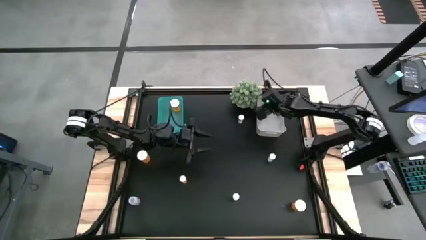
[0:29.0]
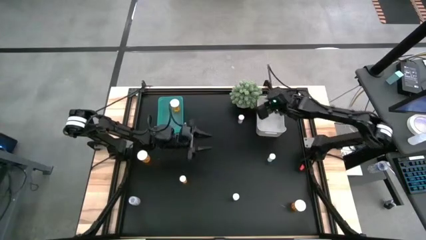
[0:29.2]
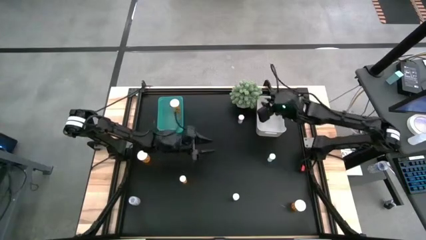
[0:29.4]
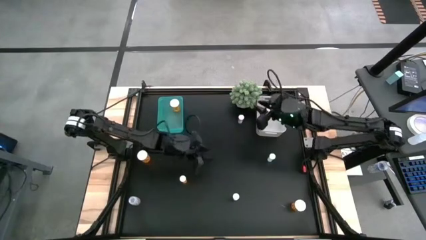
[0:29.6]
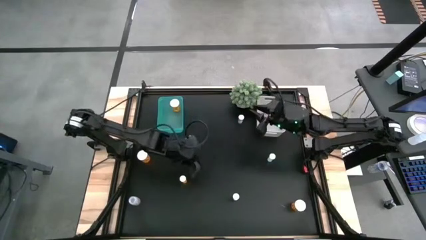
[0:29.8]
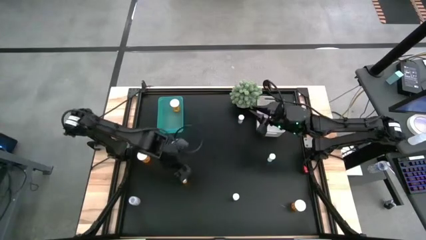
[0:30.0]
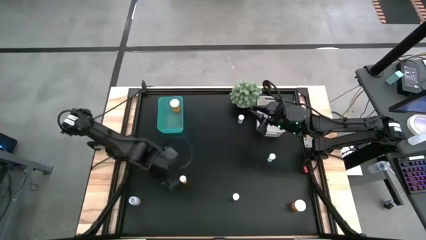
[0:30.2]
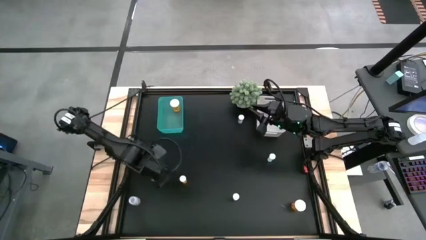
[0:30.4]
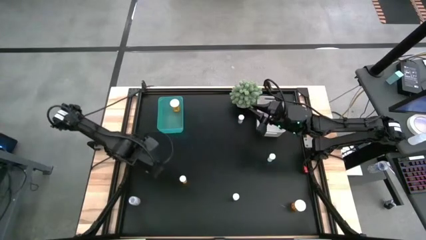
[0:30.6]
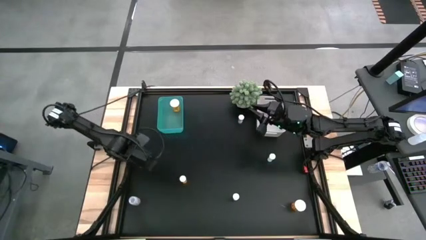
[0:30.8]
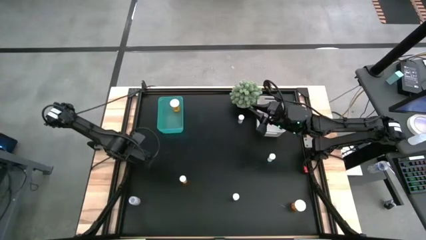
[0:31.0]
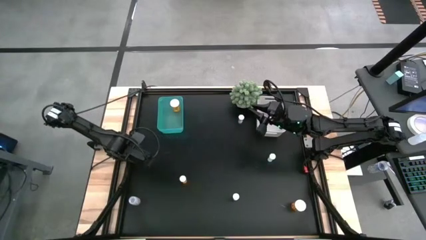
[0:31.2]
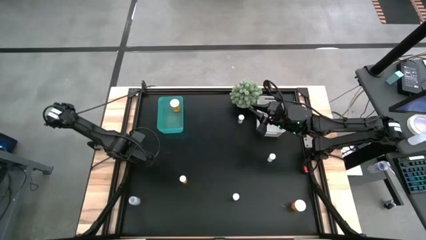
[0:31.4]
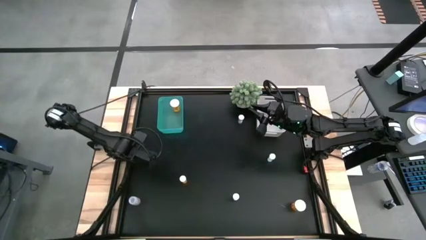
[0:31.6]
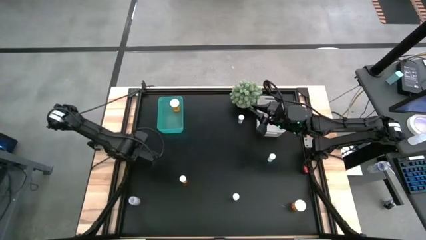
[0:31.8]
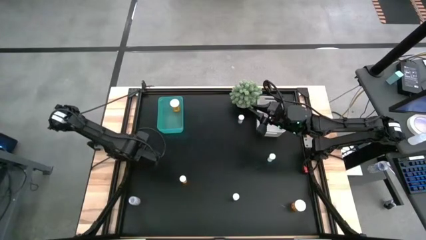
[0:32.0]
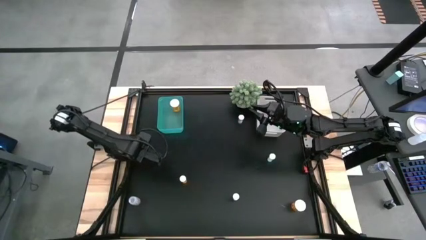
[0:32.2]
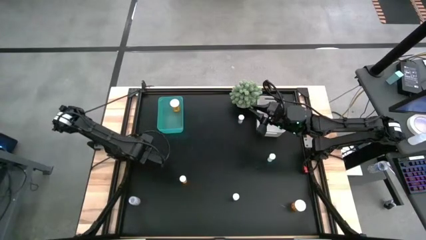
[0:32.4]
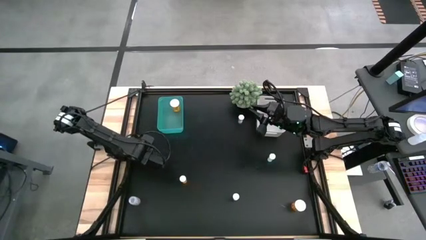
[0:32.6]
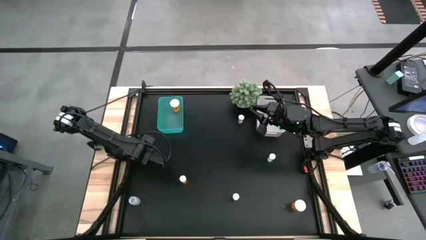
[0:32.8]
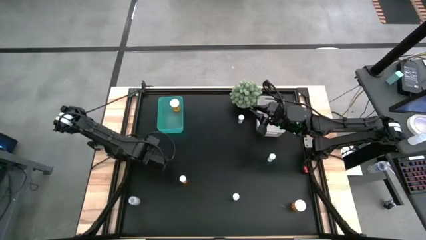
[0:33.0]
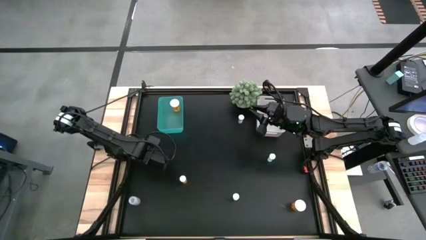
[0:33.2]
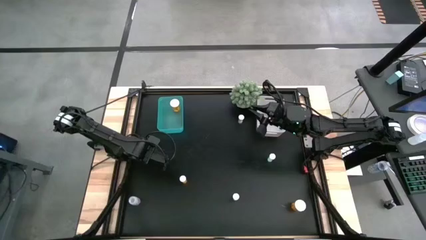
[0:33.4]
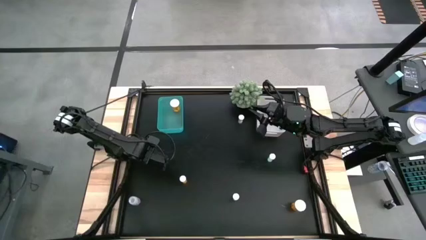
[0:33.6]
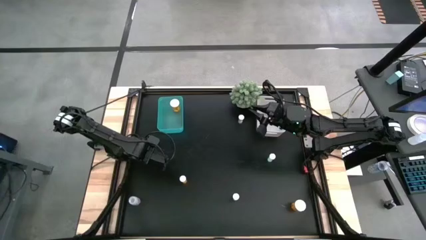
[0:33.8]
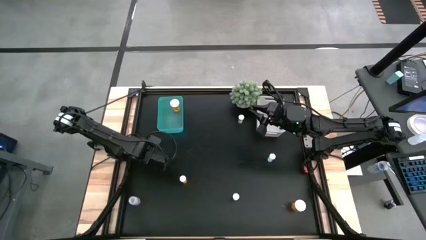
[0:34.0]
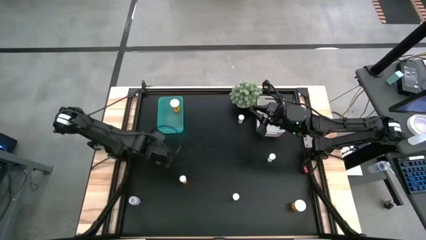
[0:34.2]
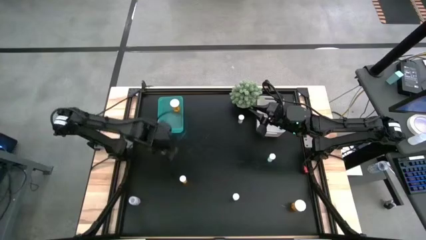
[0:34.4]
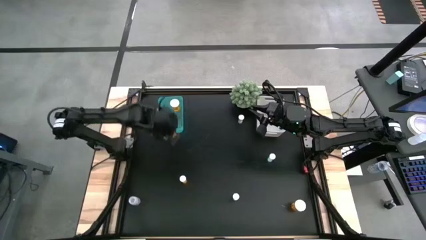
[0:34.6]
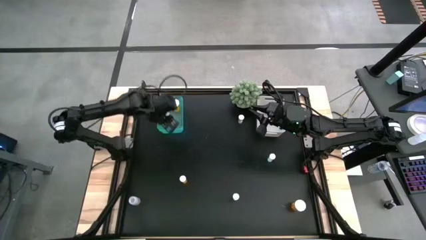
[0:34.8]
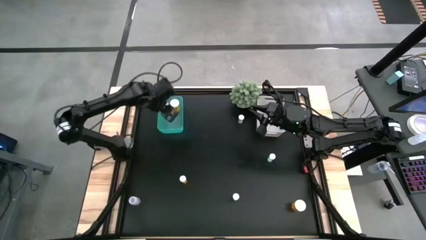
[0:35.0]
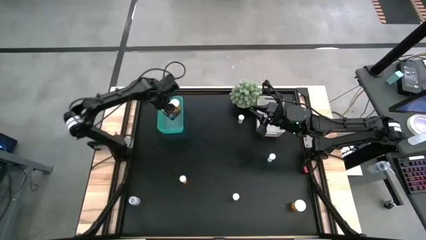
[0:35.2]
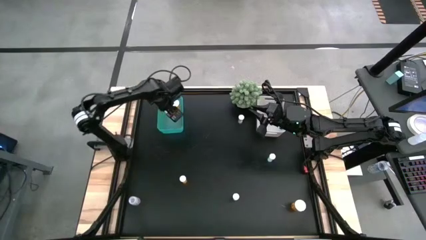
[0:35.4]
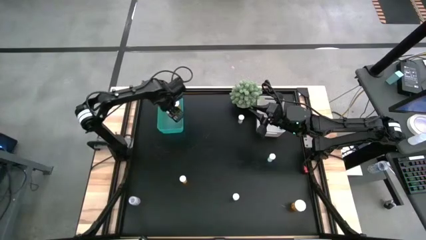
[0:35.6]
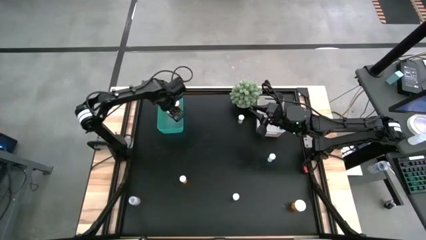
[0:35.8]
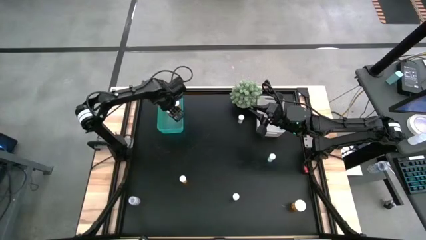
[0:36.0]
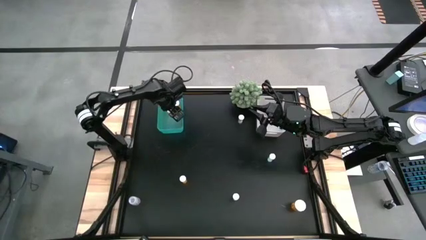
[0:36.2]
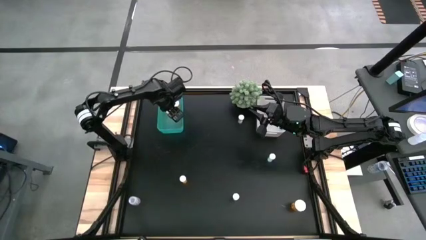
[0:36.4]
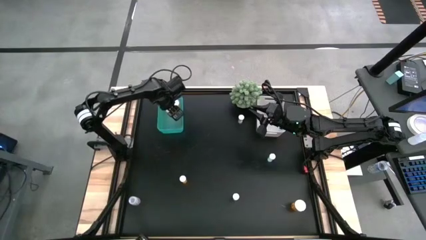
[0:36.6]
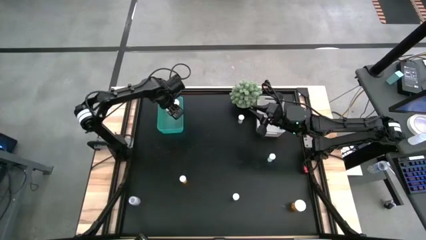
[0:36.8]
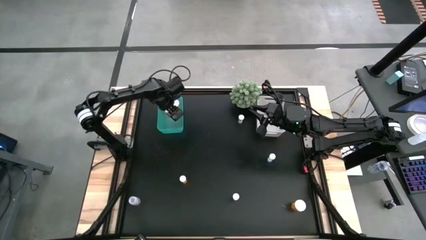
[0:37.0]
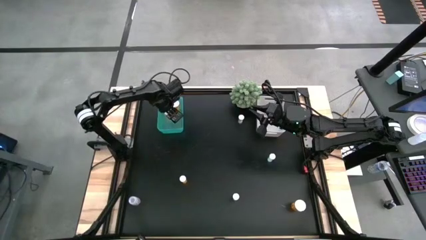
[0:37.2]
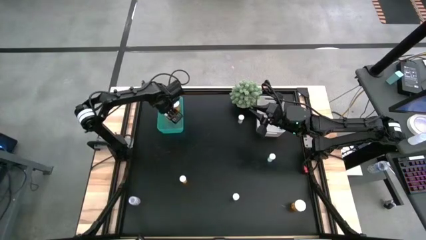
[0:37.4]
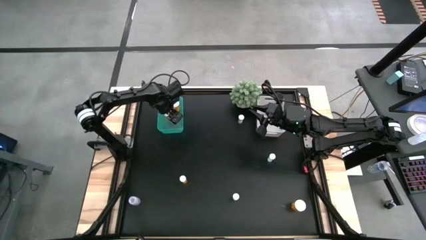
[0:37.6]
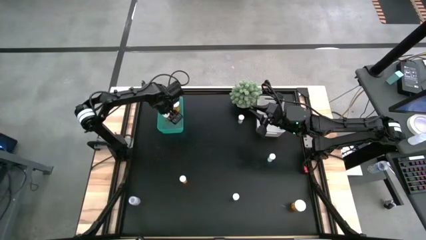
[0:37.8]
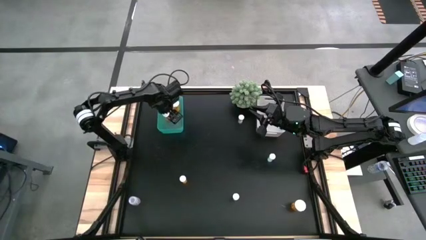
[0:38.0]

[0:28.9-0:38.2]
Task: Pick and place medicine bottles into bin by pill shape (circle, oval)
Put the left orange capsule bottle into the green bin

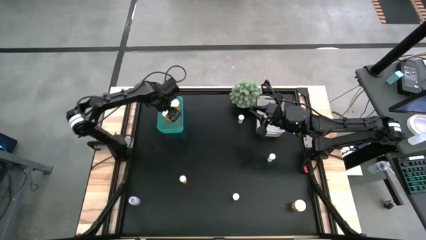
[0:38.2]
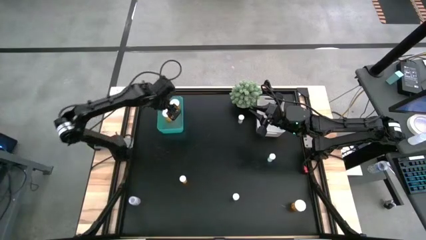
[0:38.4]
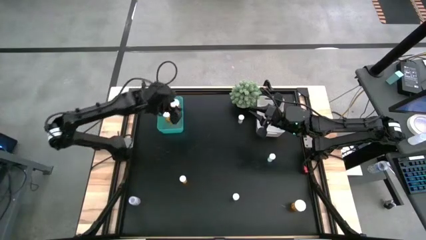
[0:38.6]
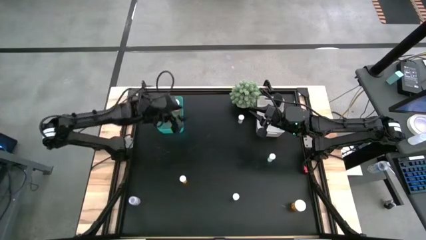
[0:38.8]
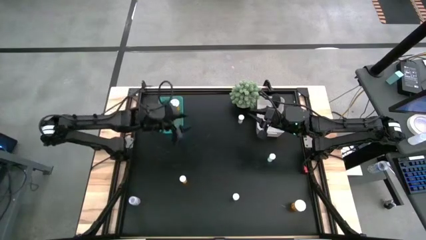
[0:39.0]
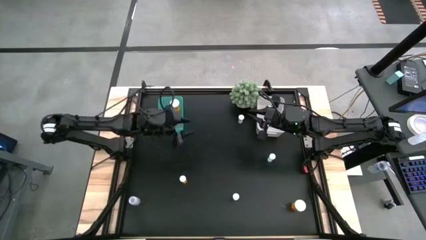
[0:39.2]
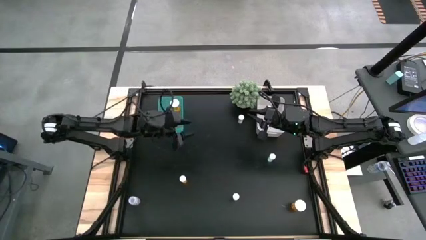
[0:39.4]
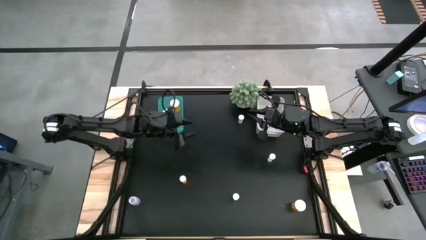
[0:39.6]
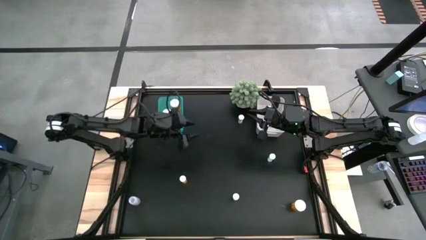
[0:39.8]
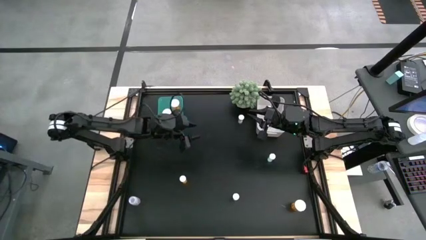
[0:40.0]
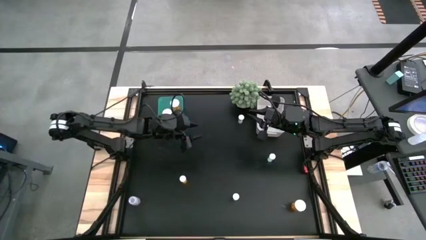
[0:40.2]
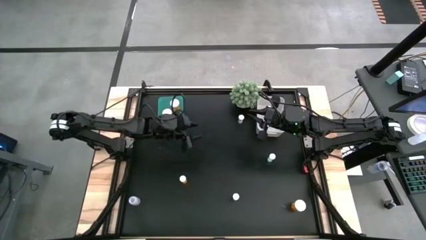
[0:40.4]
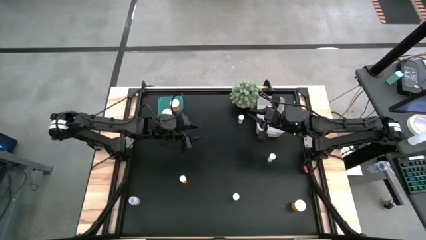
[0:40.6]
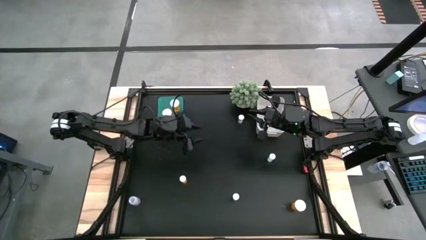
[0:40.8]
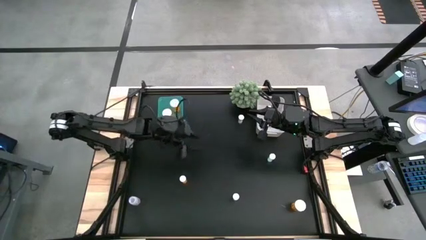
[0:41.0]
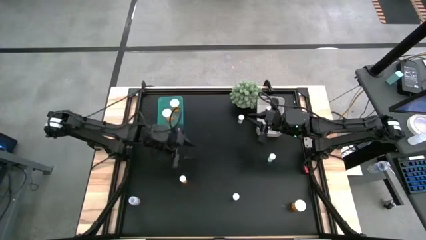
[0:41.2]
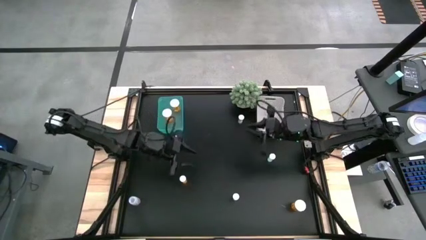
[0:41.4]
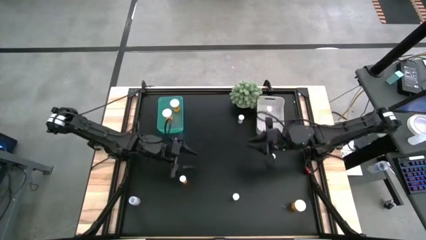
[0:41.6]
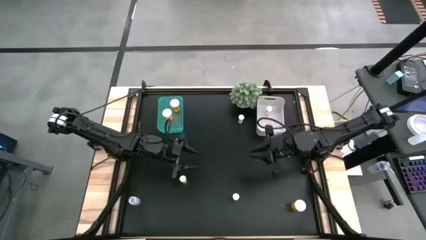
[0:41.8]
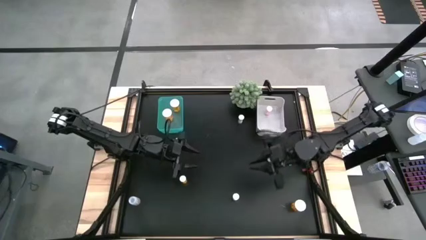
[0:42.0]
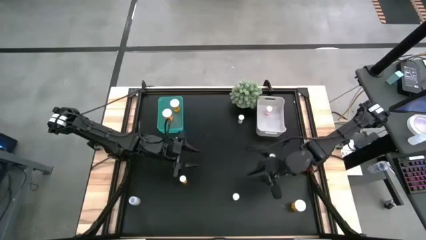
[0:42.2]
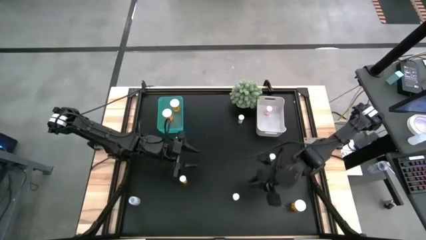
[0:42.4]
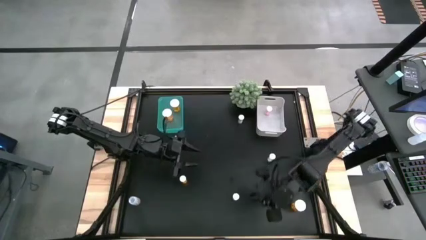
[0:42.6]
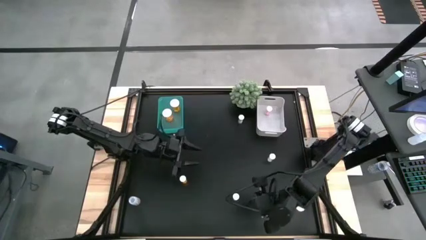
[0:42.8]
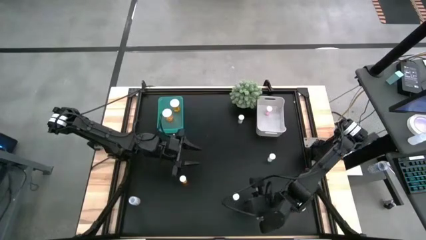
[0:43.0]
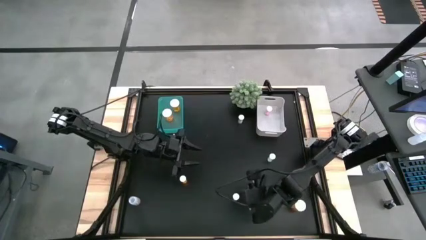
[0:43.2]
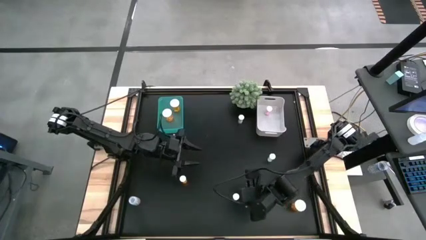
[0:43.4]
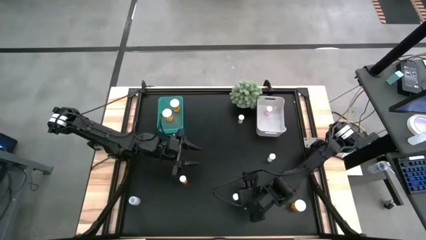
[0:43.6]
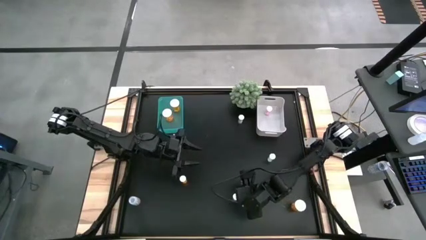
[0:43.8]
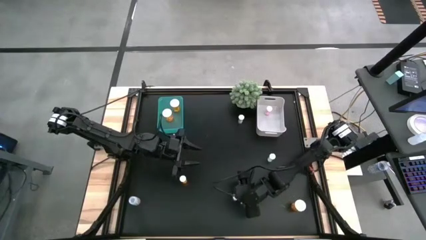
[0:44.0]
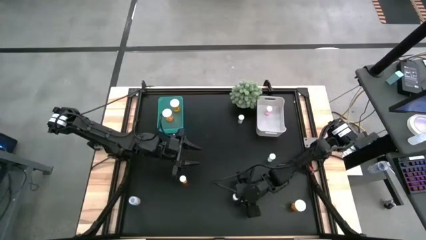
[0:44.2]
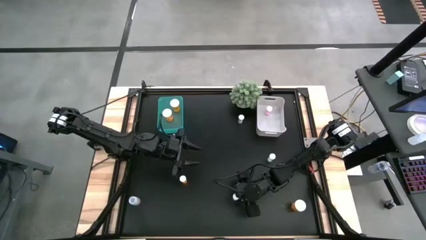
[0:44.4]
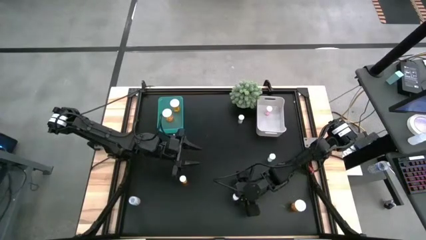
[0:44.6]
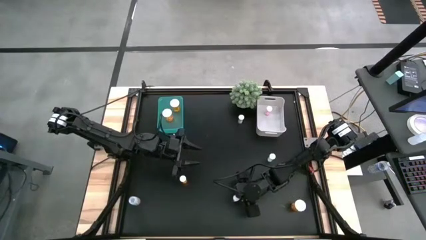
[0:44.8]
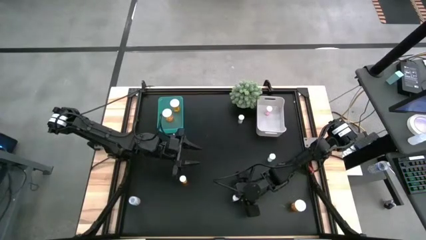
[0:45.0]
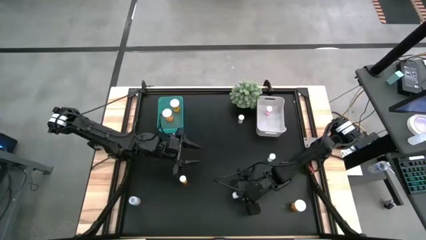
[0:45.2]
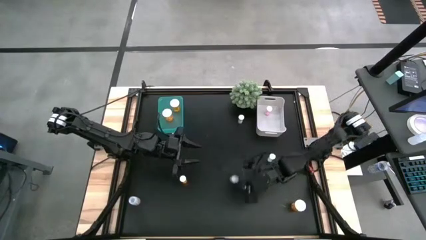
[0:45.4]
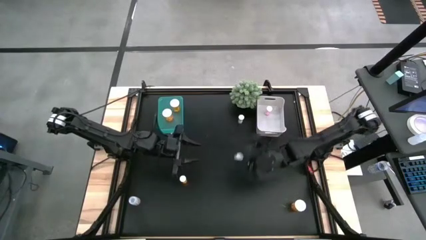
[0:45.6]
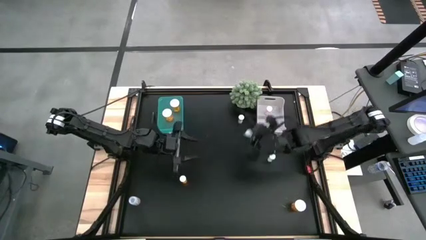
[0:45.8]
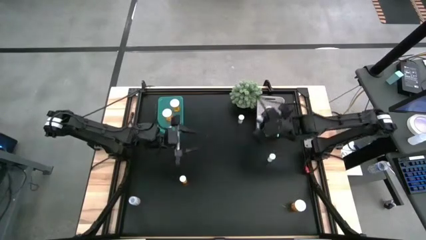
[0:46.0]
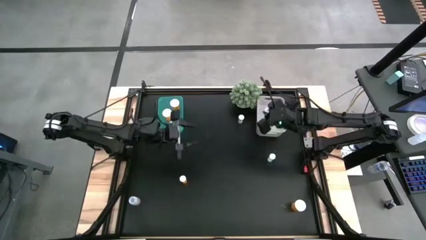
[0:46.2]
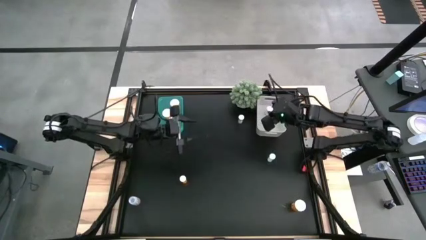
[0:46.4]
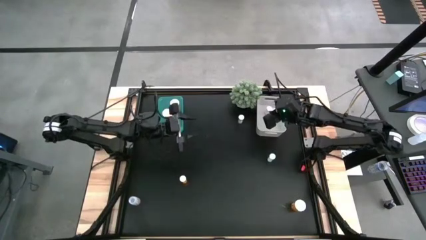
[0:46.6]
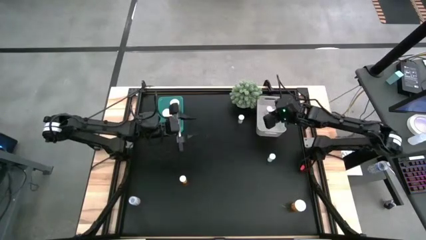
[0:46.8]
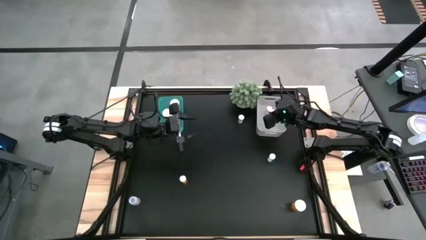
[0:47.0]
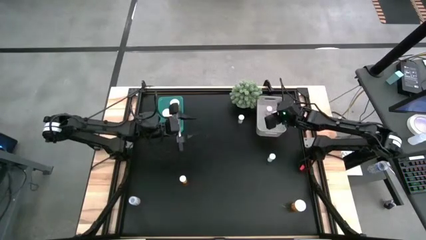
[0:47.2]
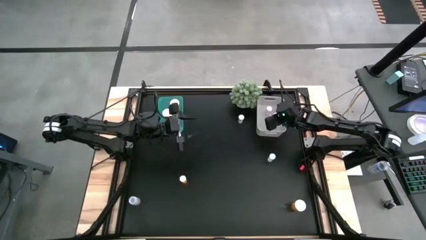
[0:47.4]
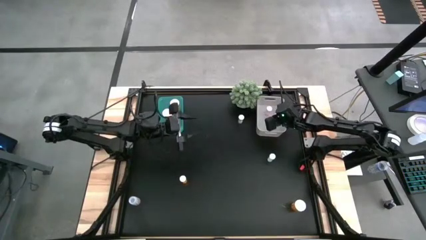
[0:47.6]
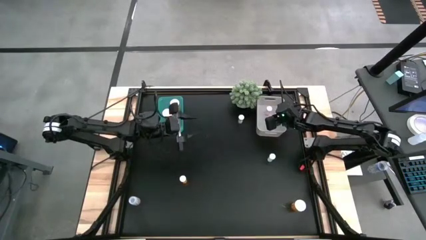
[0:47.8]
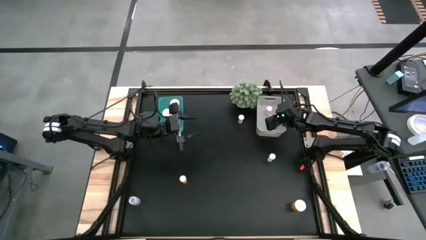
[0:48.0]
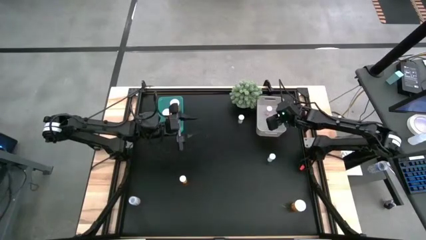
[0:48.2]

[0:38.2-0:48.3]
Put the bottom blue tablet bottle into the white bin
